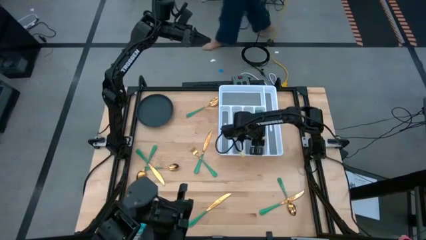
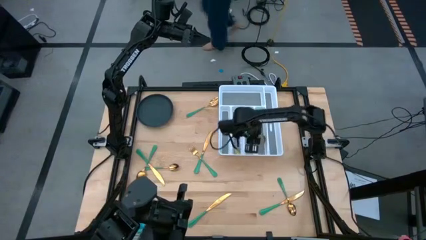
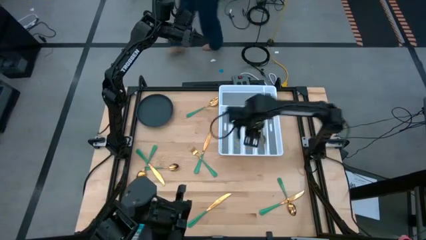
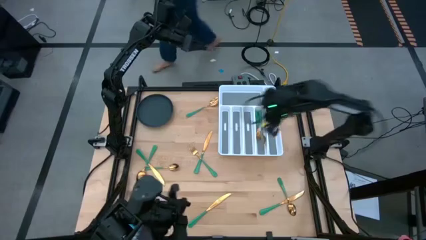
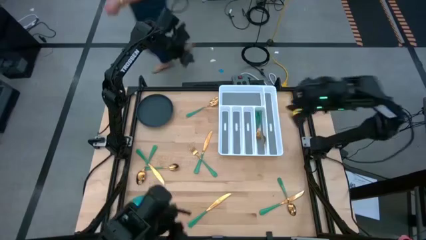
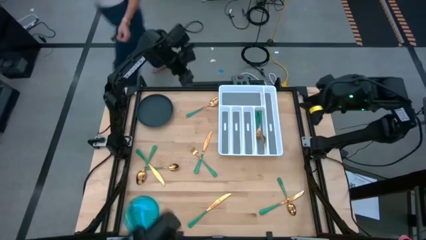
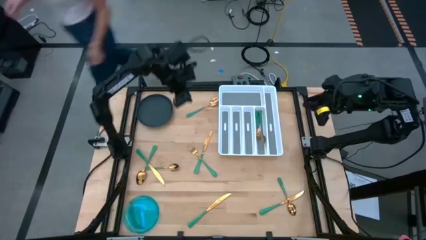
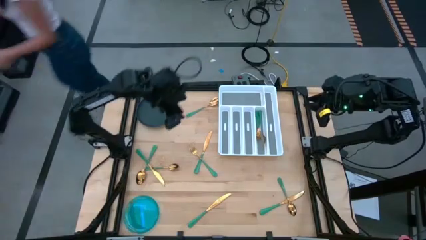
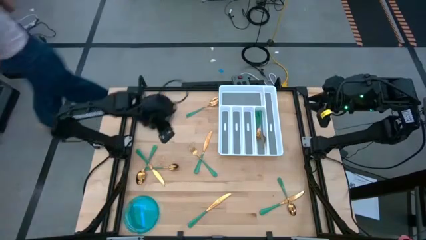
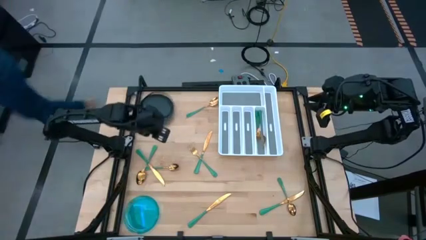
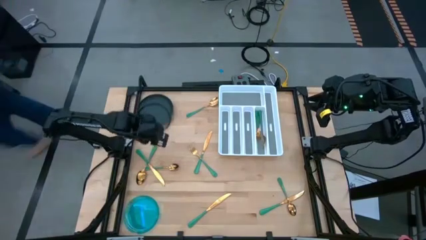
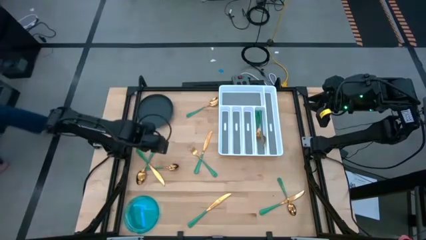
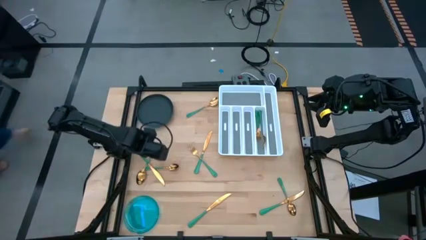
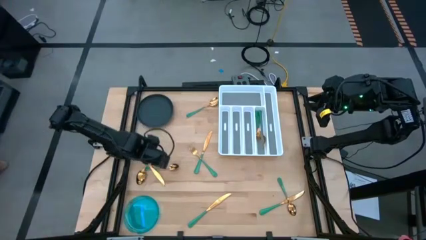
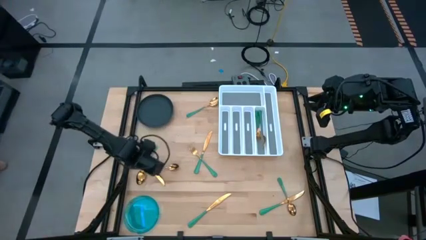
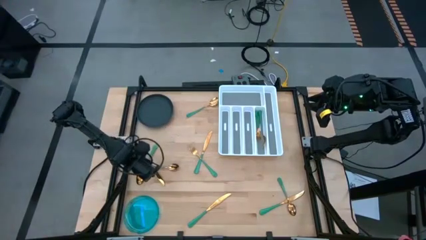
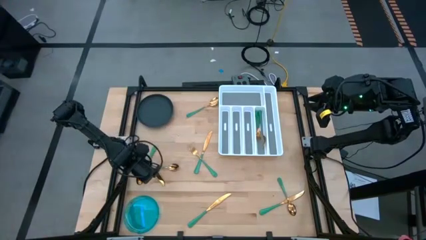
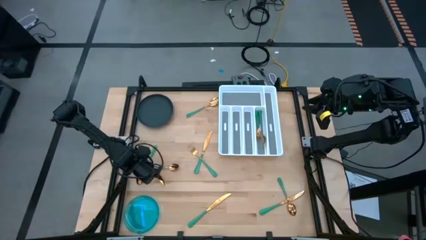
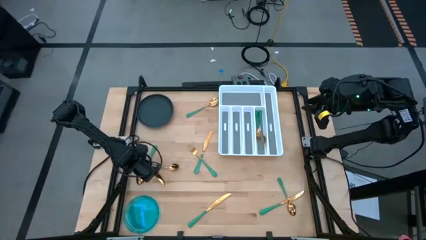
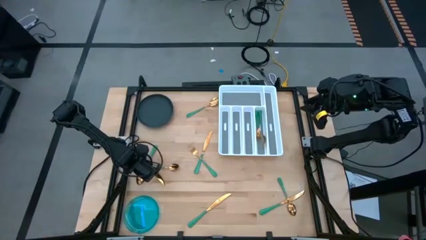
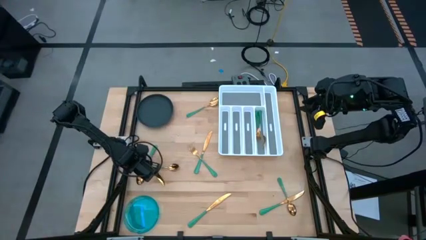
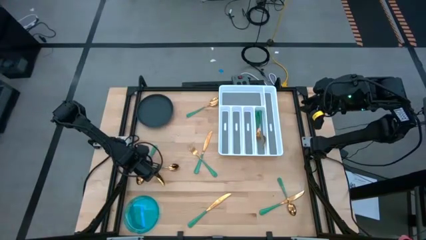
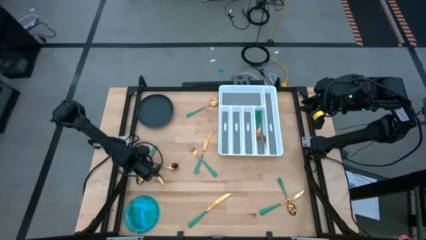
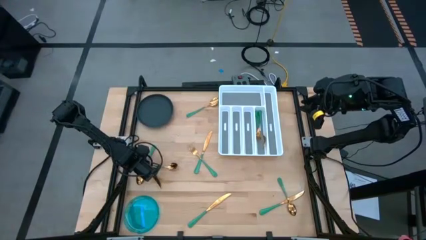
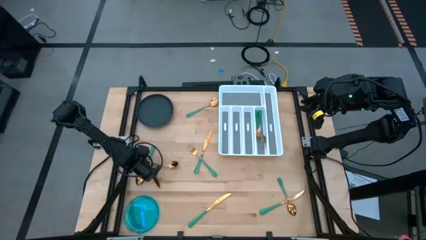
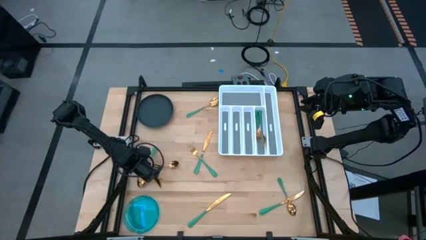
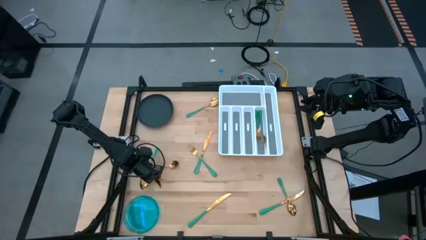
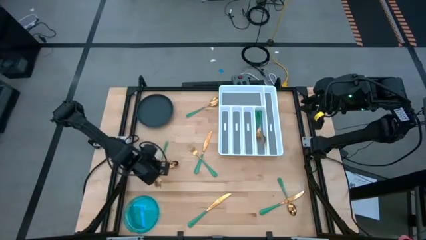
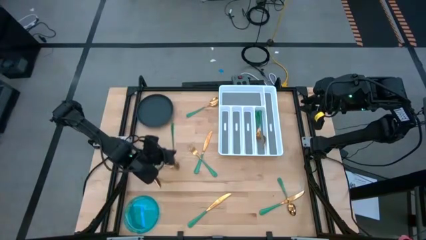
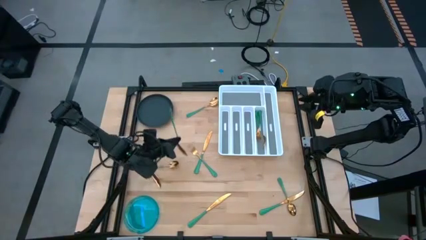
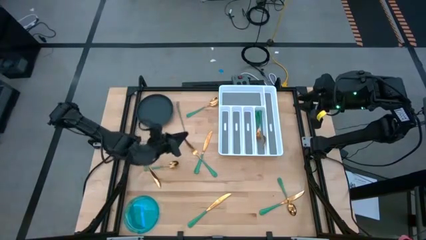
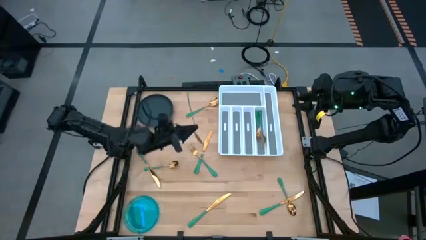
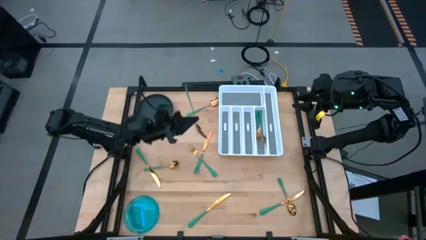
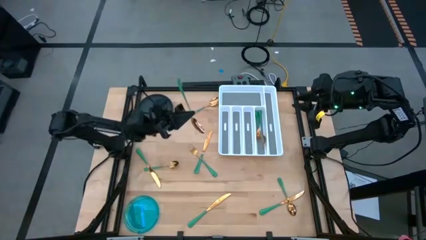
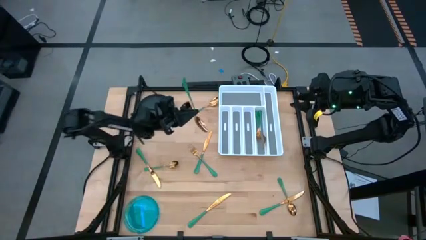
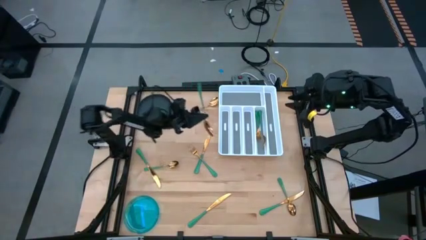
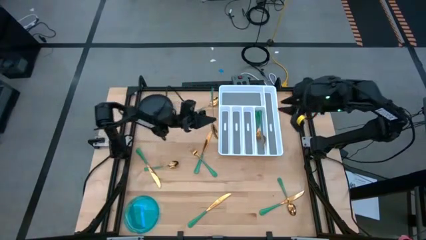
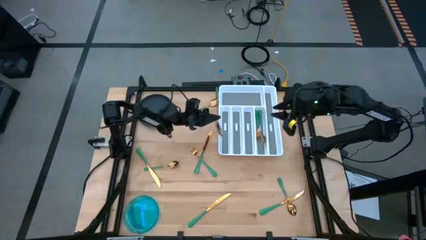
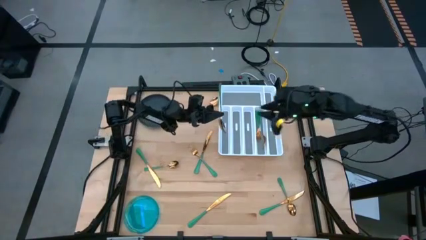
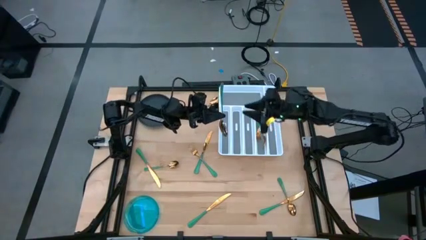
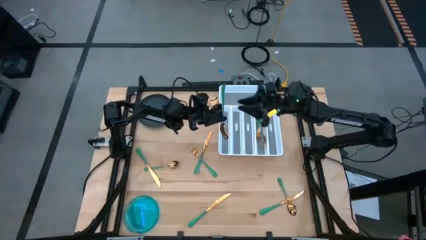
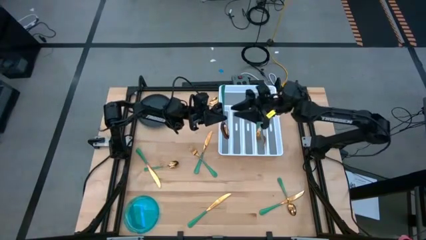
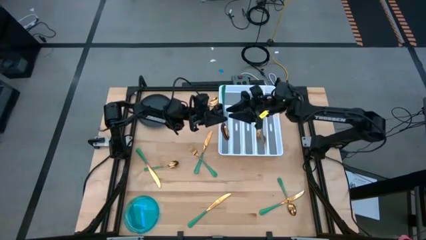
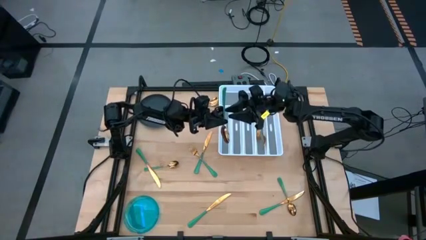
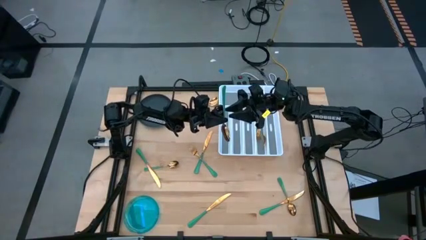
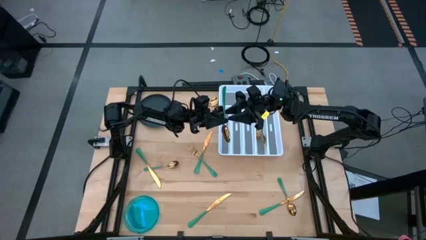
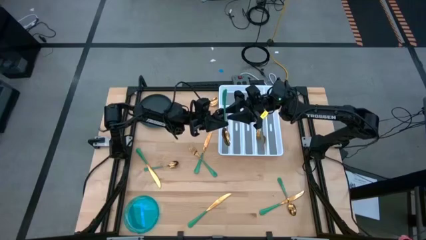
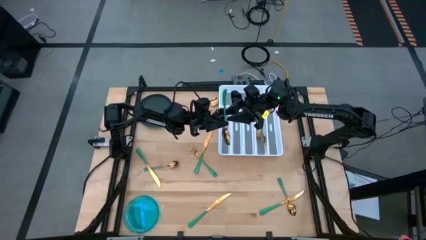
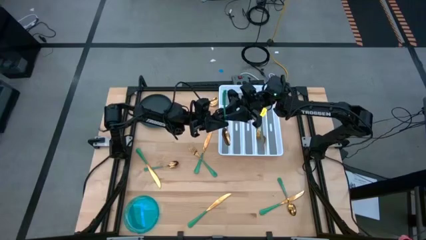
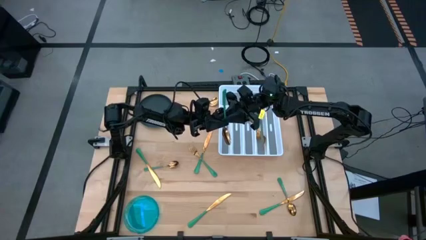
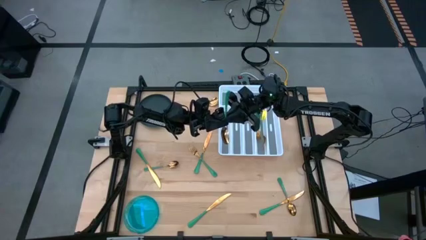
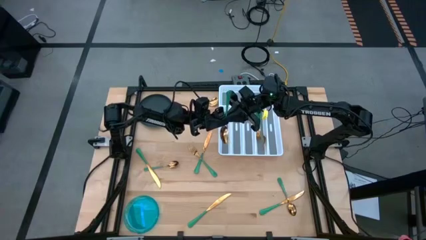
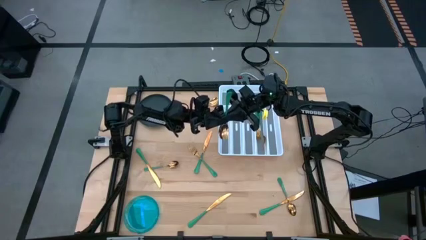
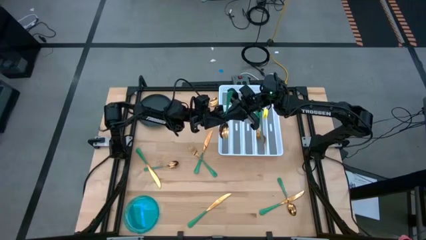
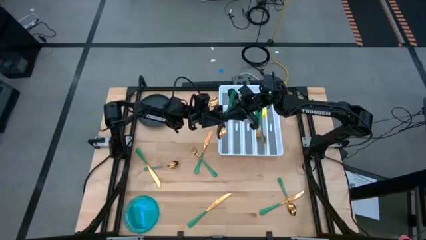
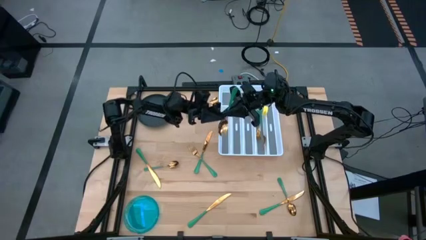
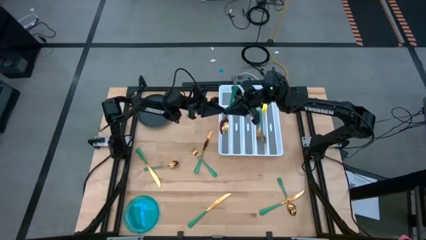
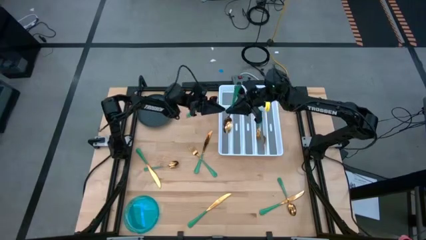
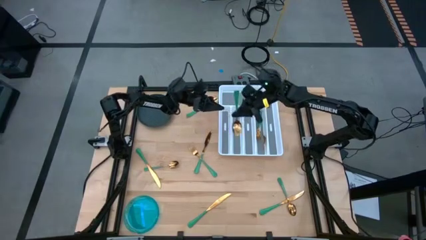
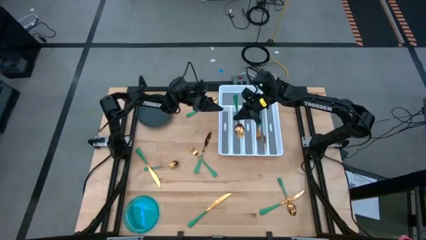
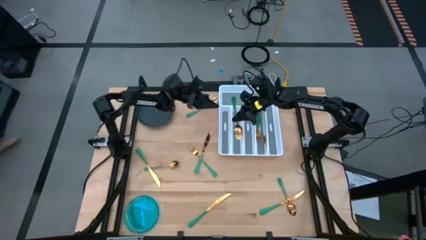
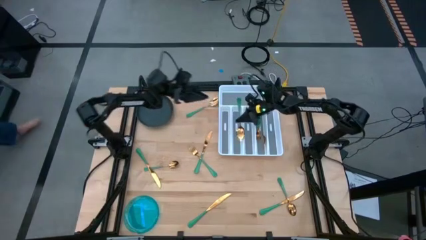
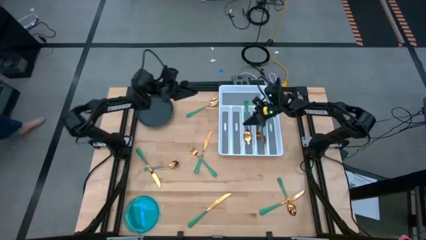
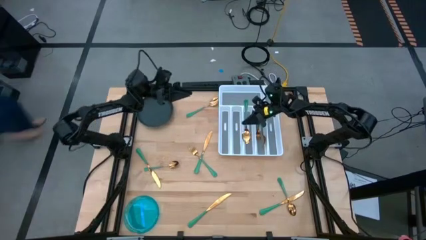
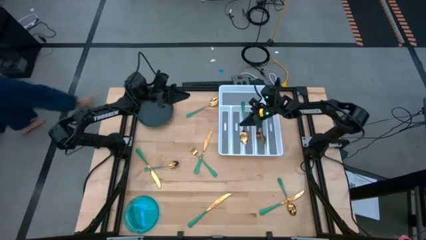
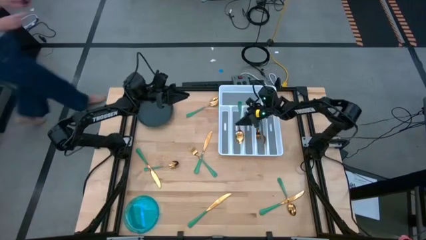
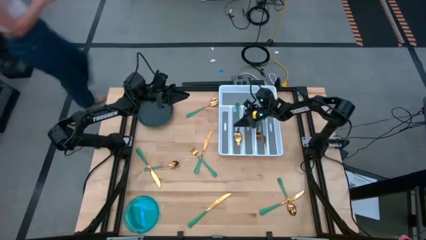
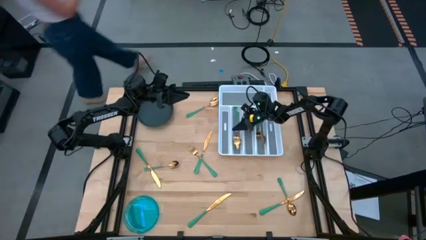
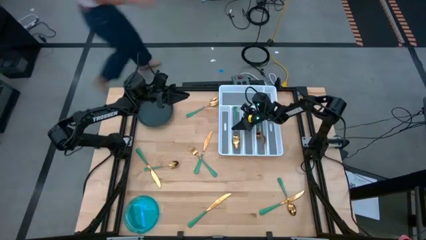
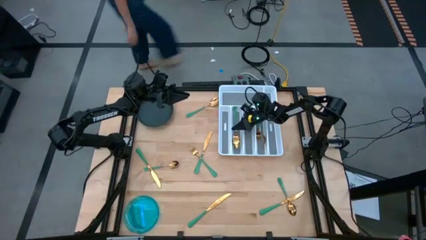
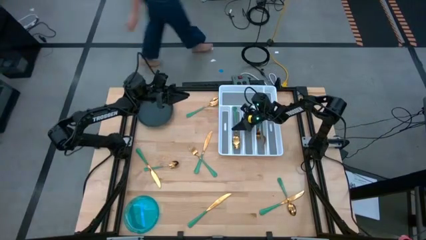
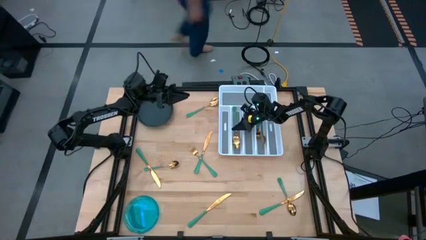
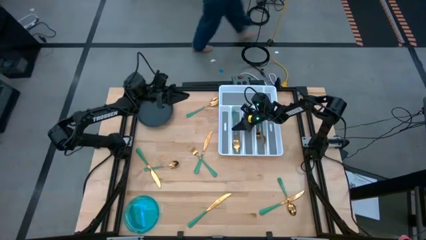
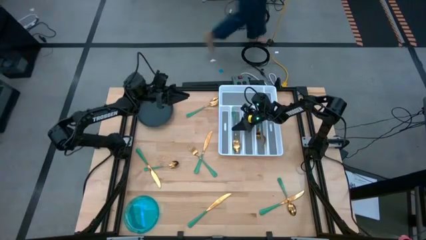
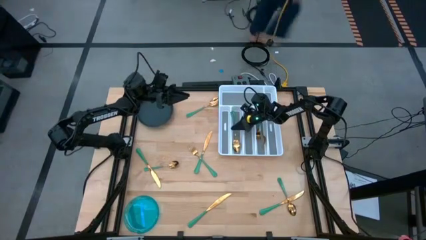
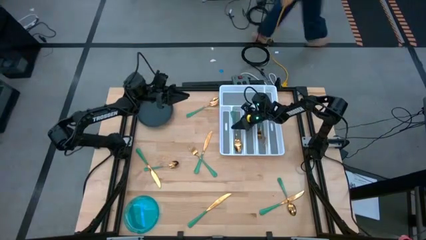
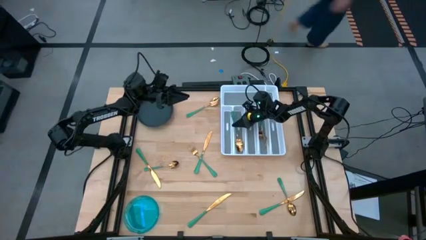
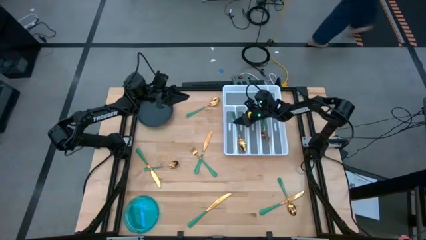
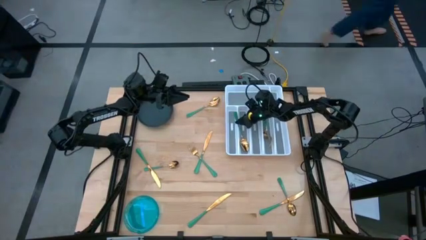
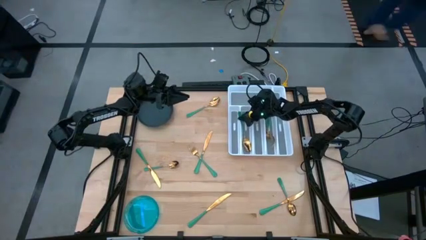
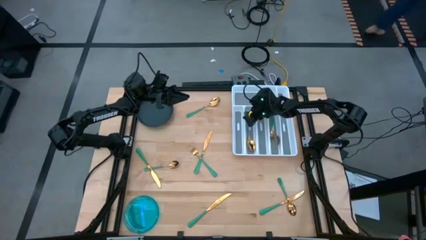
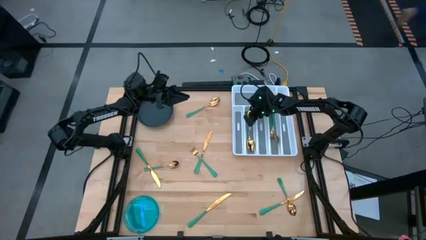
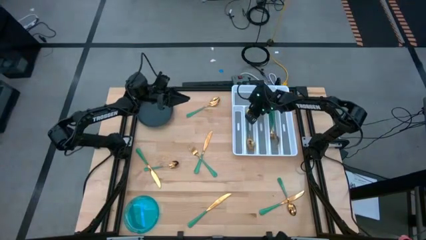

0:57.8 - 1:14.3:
Task: Sort silverware
Put the green spoon into the silverware tray
